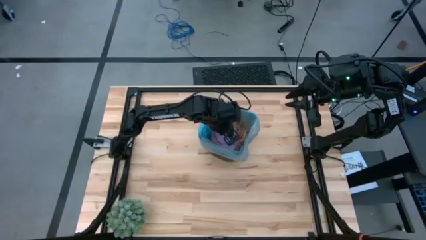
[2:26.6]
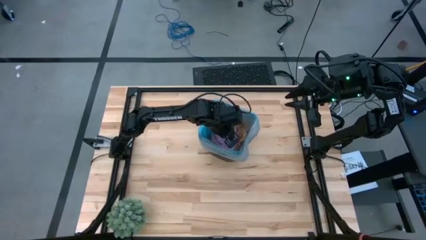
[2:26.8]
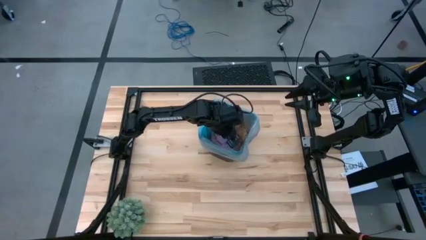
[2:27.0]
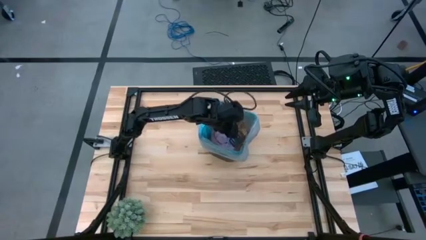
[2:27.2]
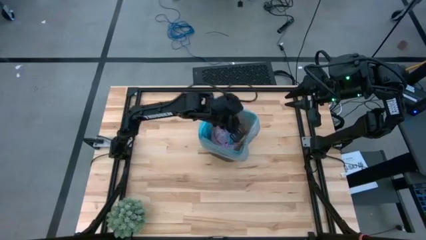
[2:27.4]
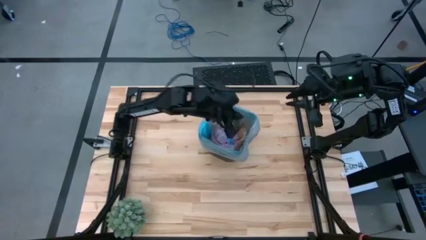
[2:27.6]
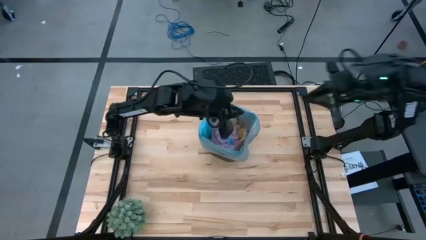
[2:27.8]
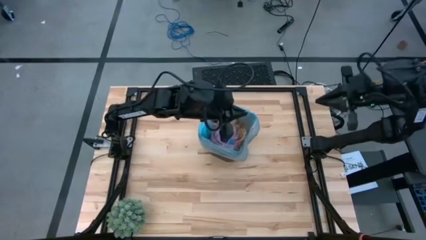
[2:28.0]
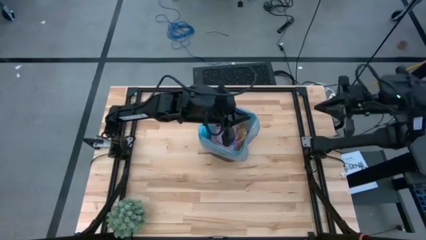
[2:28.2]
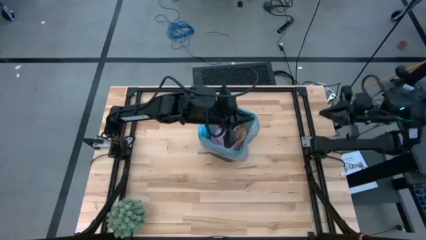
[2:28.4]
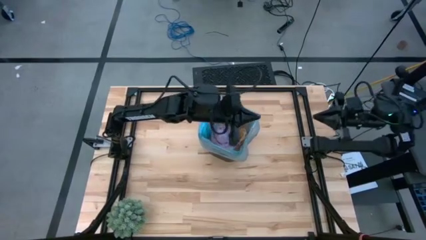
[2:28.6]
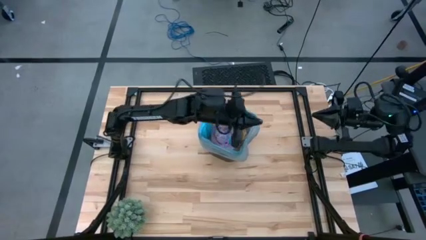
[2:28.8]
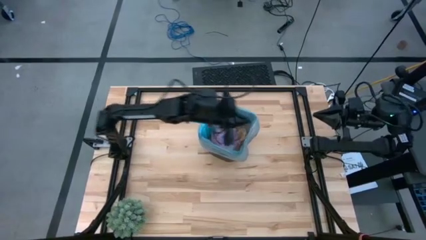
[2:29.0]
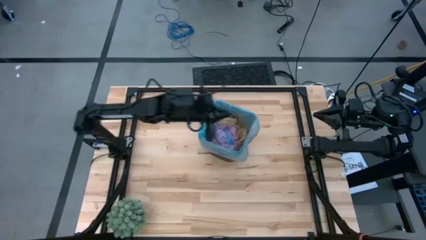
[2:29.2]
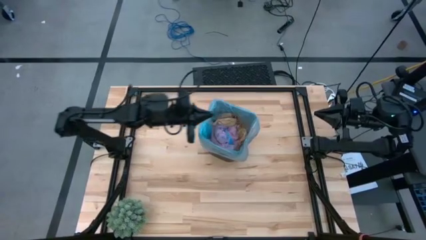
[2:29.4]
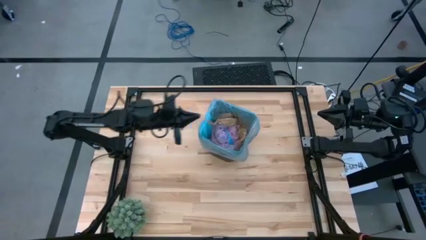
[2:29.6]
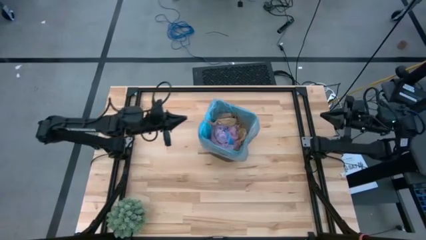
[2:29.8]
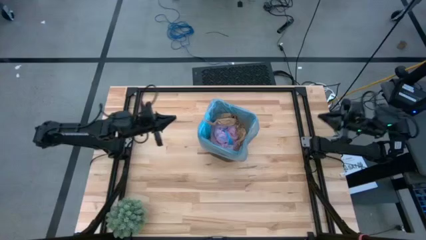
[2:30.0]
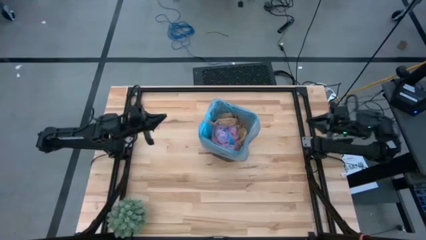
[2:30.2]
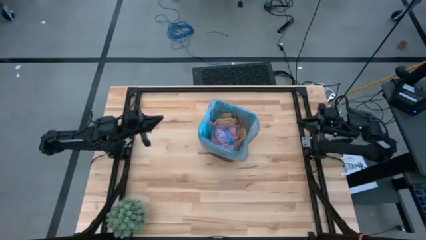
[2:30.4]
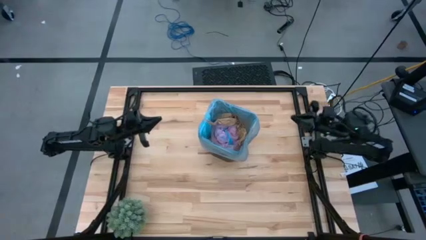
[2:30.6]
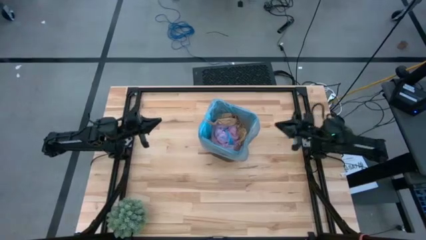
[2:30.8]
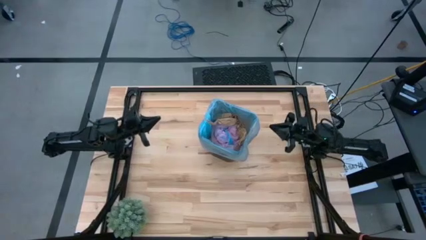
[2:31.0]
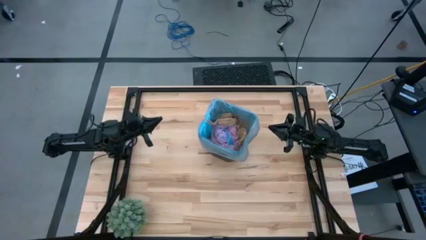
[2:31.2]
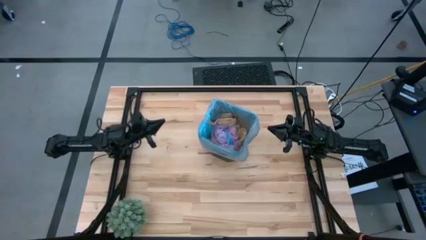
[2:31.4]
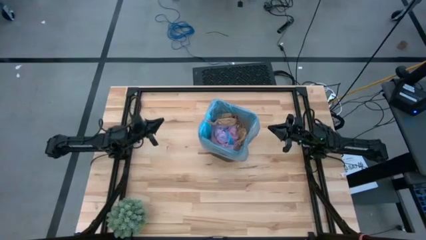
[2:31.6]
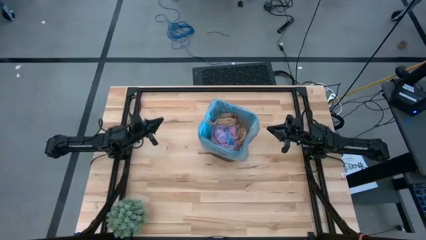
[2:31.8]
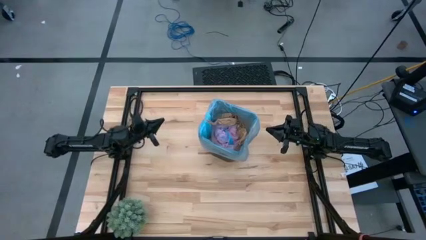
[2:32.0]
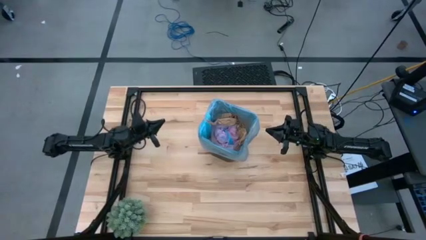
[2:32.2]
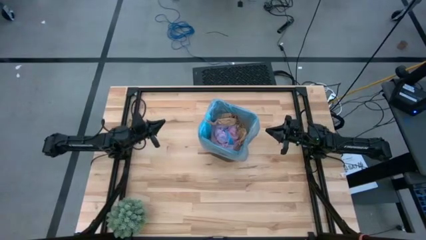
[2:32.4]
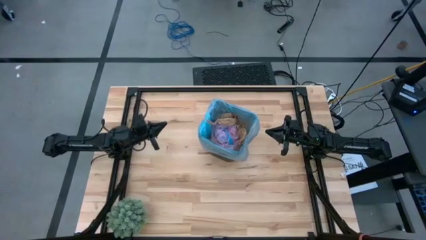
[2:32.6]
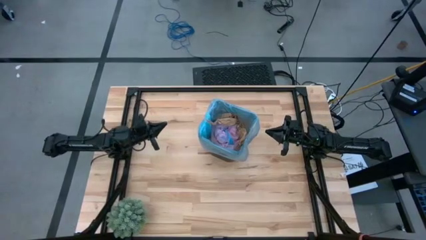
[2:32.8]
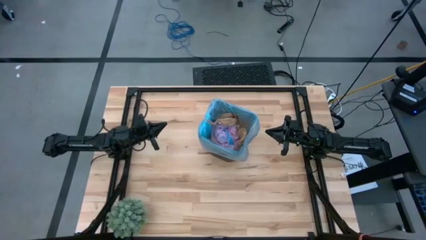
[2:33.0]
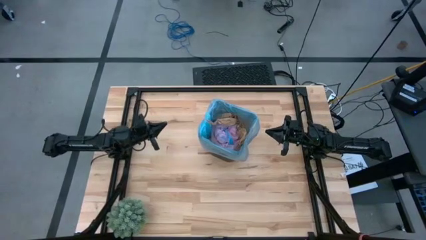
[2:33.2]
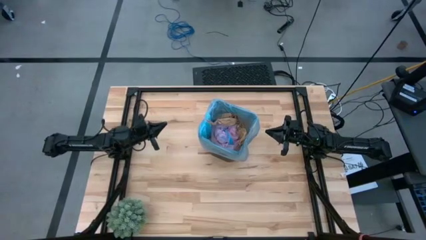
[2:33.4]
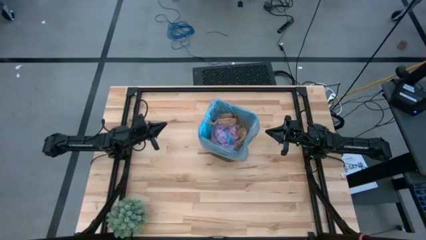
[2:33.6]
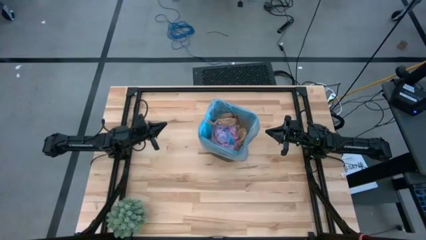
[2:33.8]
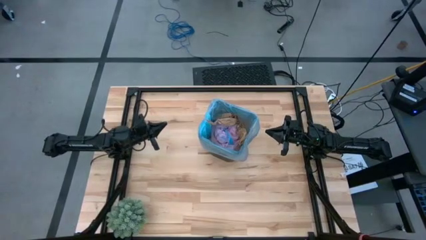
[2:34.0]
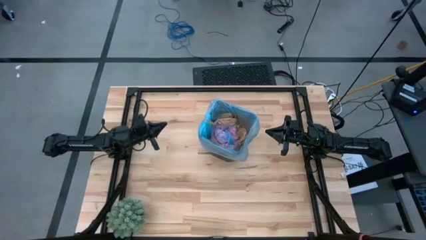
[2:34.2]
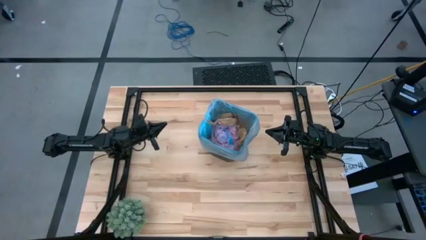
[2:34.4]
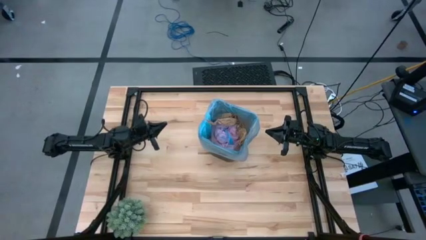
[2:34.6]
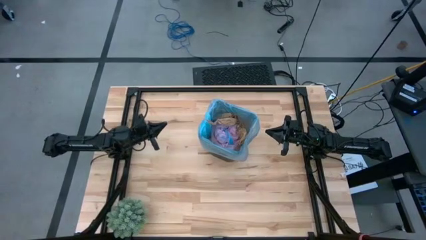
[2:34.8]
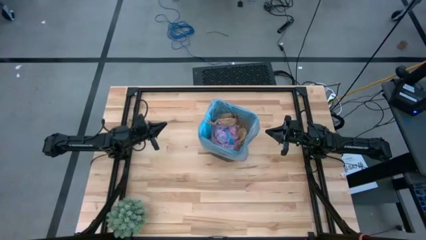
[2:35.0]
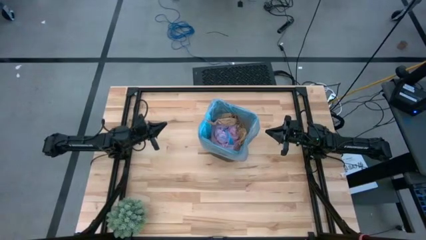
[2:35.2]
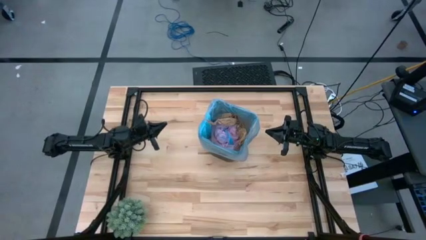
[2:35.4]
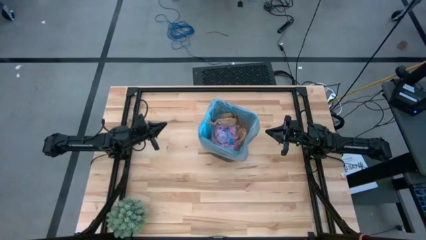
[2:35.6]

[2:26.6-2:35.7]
Task: Pick and place trash into bin
Return to Home Position

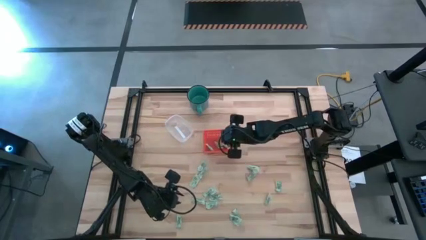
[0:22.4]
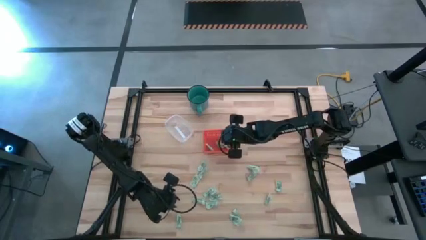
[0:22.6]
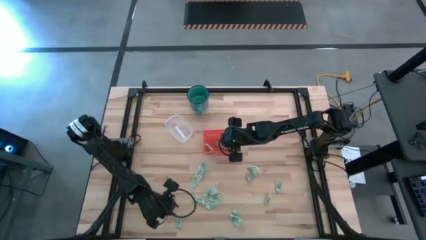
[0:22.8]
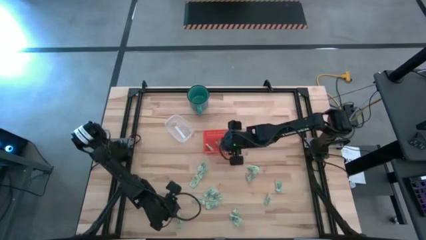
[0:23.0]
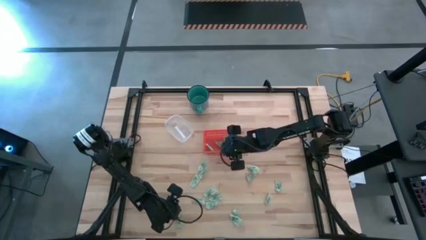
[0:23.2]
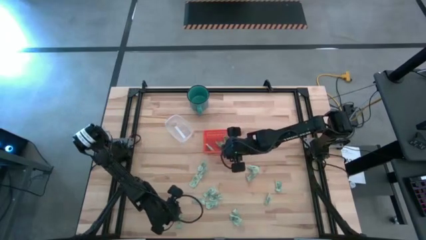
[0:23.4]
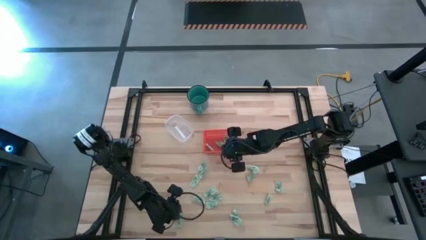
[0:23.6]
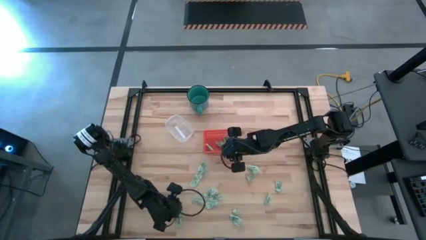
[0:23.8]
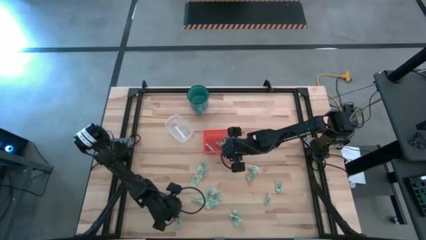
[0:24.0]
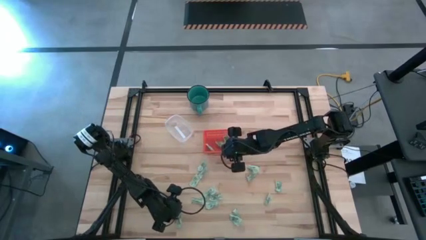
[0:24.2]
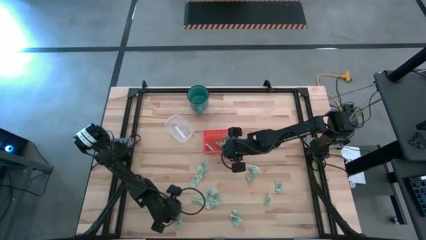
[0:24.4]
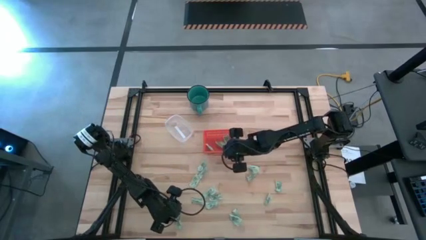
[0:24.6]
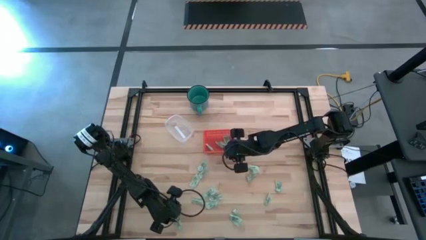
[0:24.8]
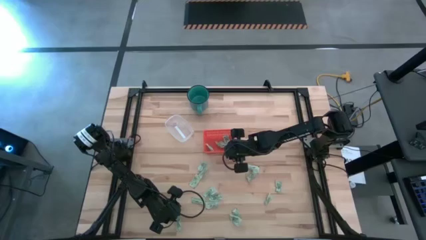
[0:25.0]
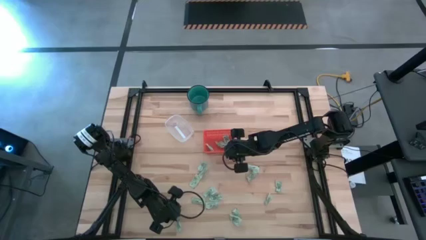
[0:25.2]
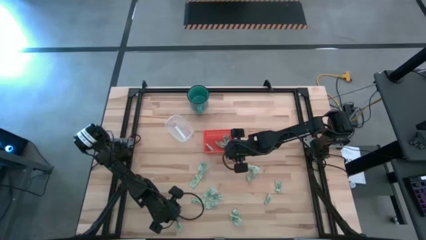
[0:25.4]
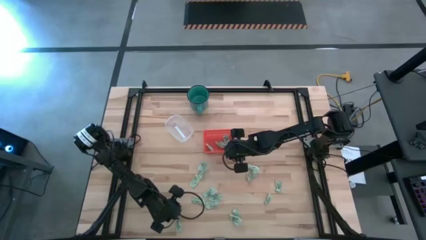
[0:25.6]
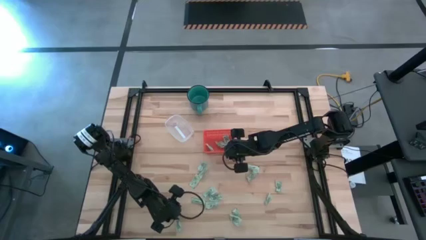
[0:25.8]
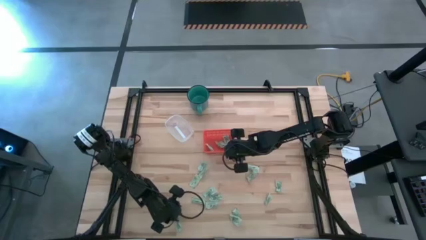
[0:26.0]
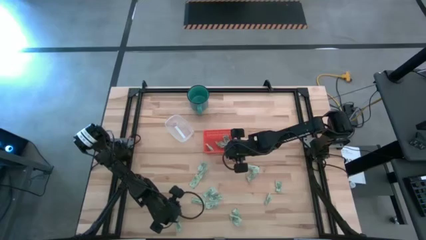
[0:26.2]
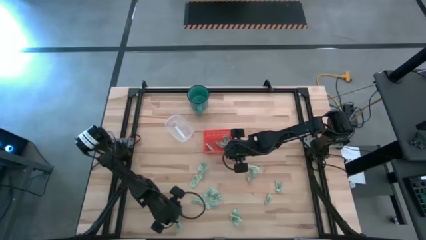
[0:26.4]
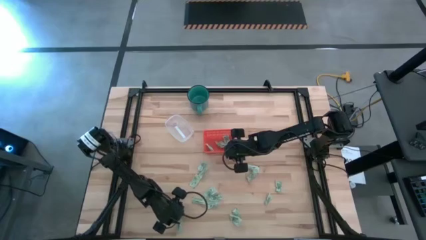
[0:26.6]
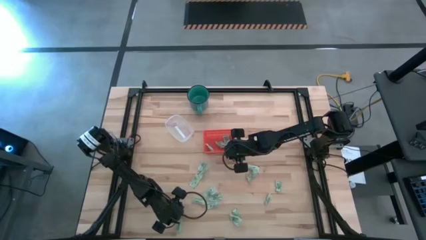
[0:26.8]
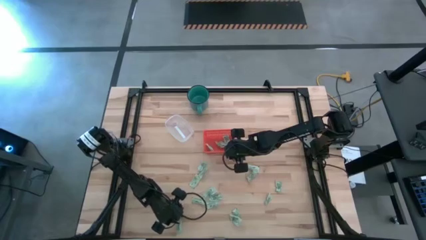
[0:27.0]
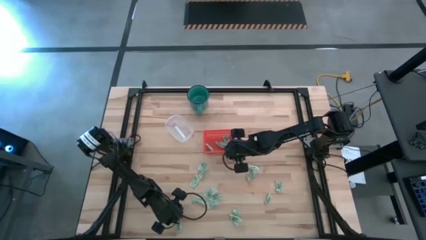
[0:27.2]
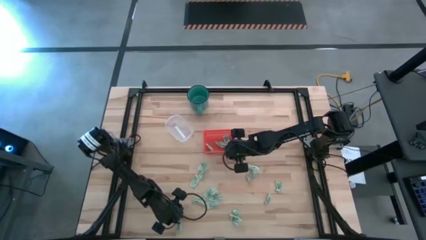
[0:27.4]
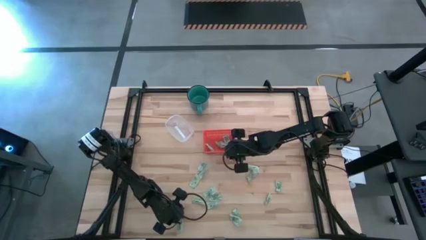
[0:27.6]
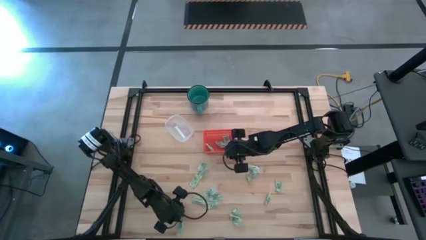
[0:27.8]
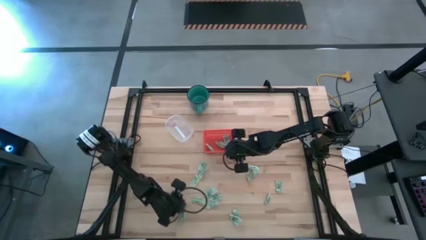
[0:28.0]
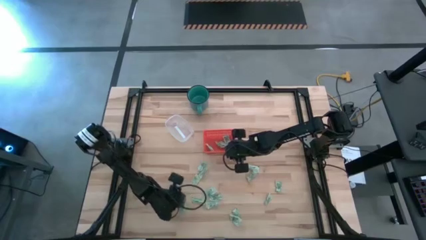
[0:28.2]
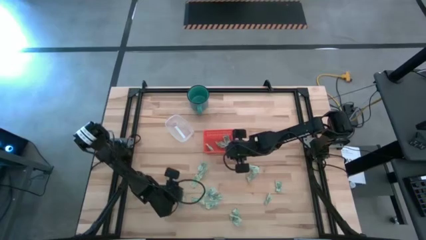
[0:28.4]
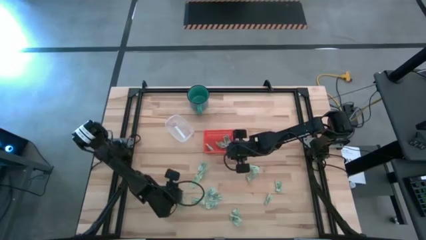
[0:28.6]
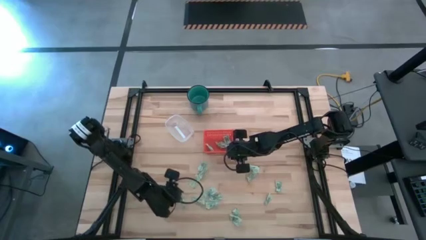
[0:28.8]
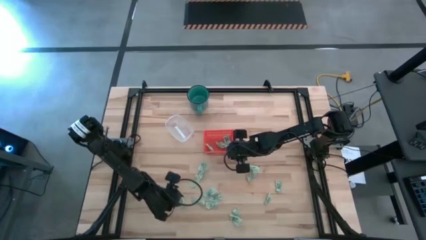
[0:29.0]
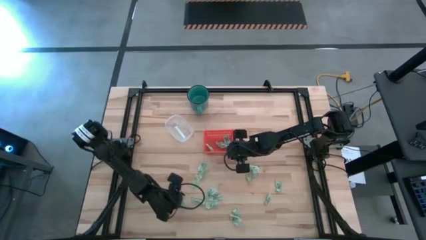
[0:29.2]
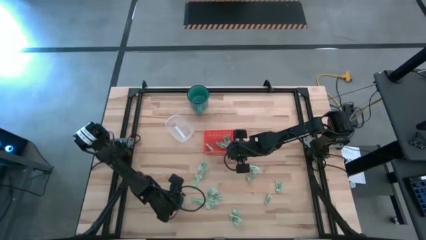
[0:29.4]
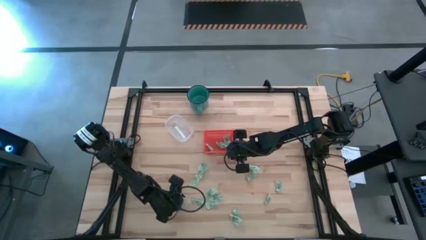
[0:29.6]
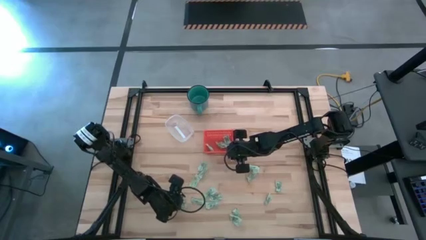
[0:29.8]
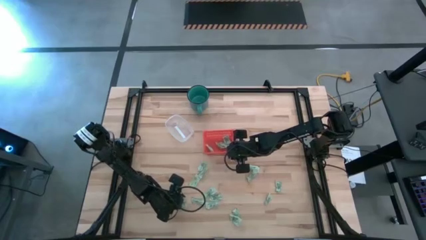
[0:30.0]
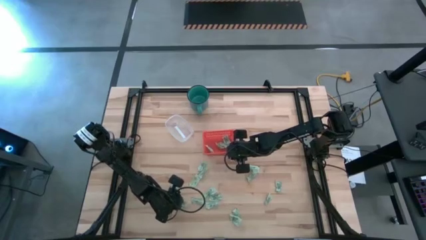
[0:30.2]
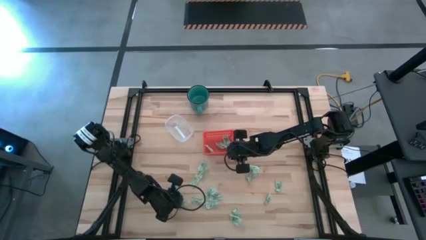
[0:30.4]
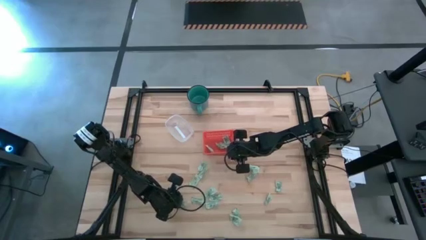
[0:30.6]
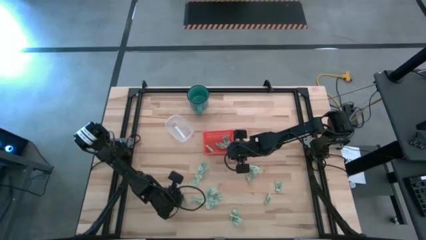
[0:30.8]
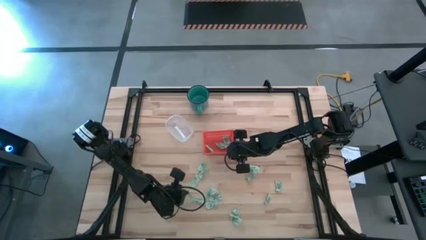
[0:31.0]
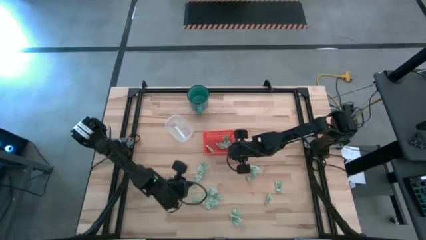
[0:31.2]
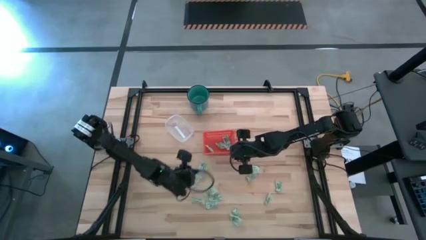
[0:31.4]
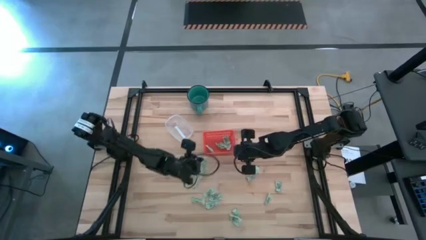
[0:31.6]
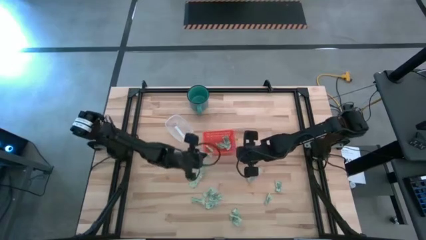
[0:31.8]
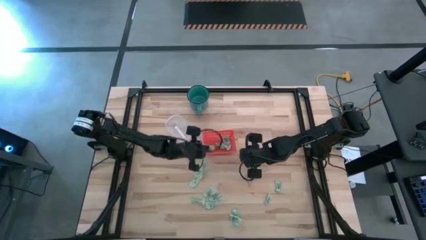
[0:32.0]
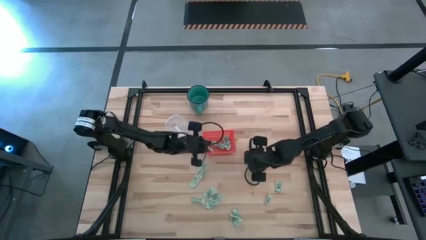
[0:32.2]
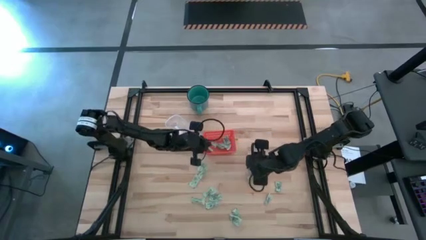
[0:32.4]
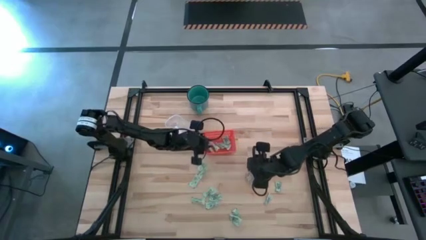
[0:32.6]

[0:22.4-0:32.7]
Task: Pick and place items into bin
Put the stevia packet into the orange bin
